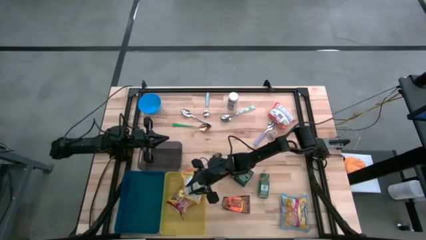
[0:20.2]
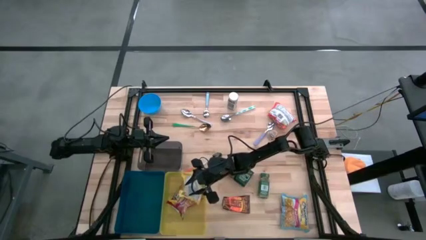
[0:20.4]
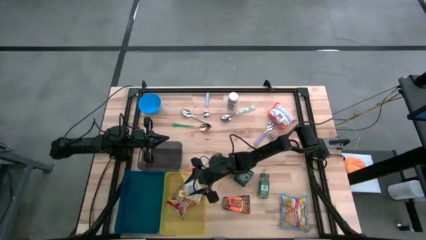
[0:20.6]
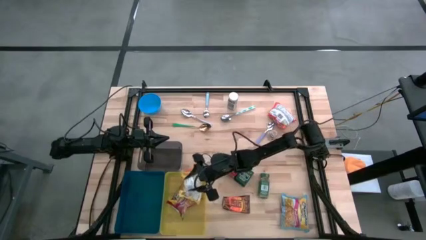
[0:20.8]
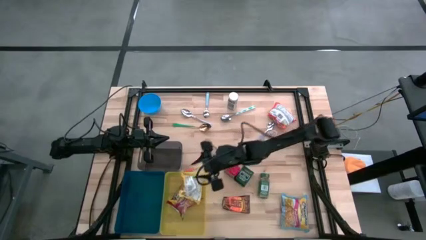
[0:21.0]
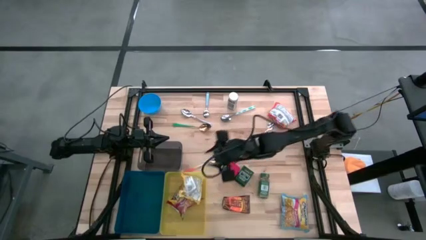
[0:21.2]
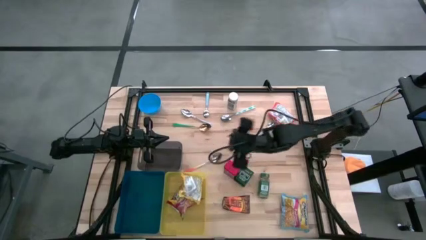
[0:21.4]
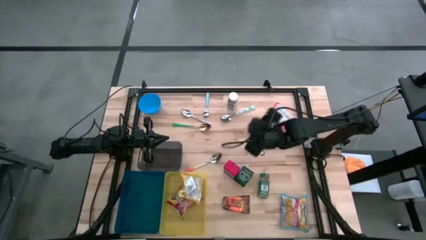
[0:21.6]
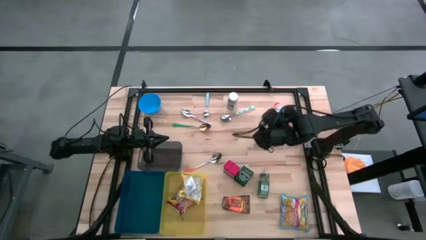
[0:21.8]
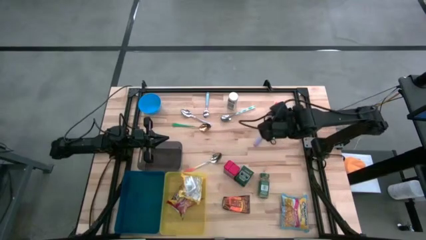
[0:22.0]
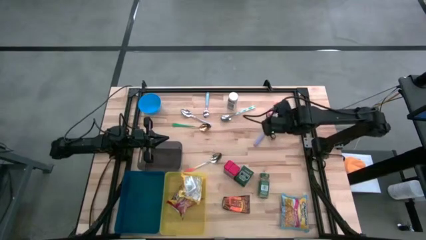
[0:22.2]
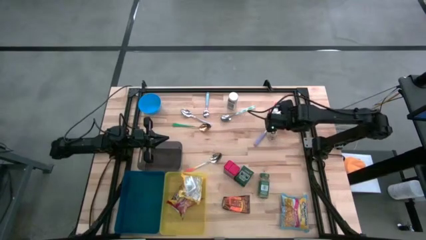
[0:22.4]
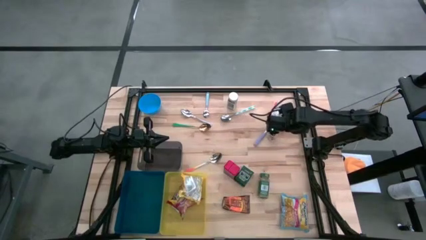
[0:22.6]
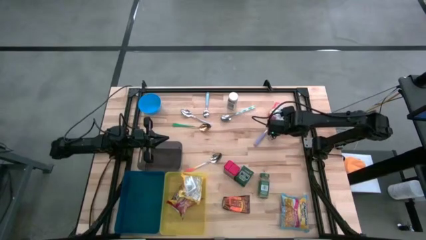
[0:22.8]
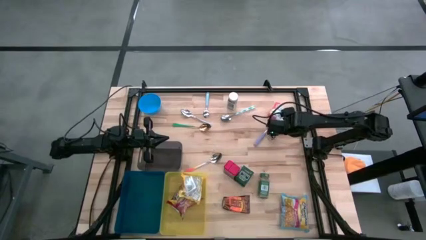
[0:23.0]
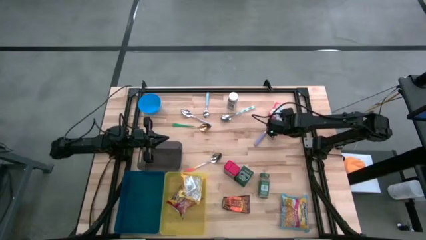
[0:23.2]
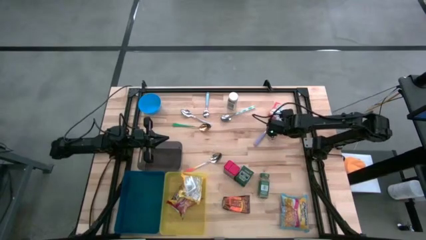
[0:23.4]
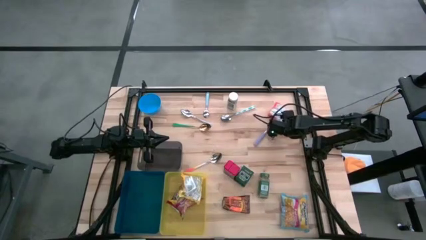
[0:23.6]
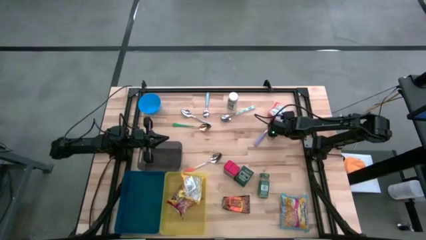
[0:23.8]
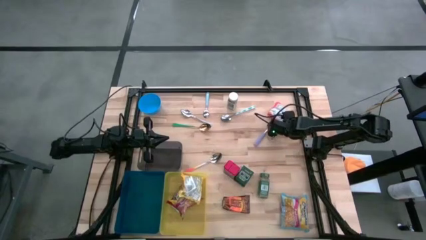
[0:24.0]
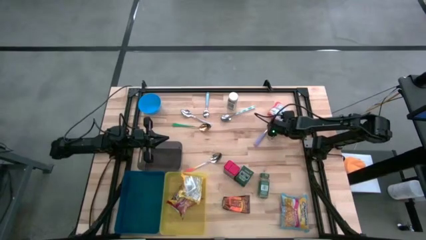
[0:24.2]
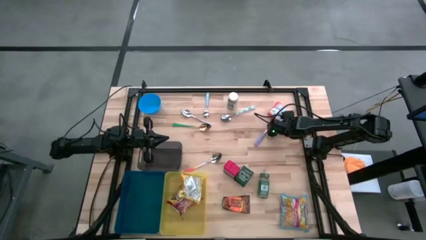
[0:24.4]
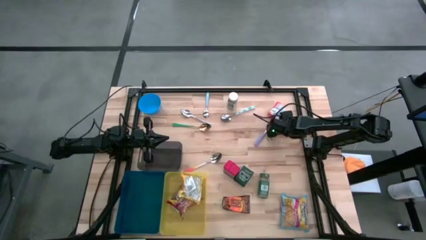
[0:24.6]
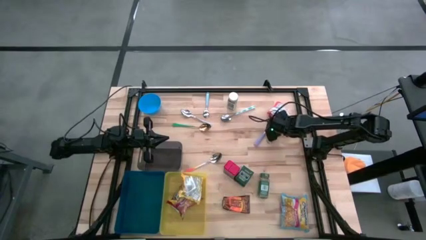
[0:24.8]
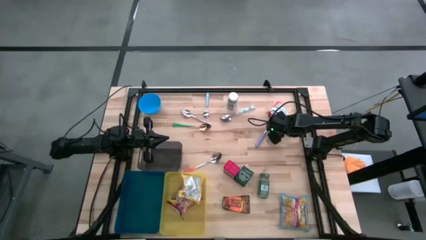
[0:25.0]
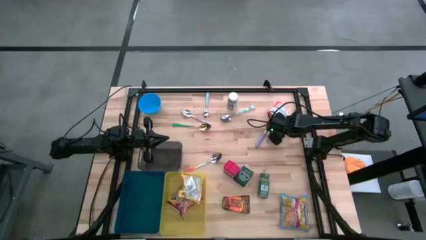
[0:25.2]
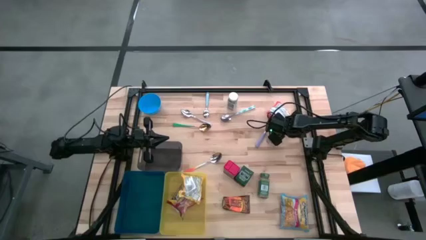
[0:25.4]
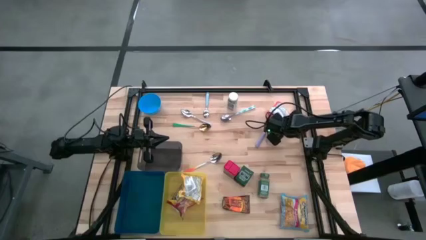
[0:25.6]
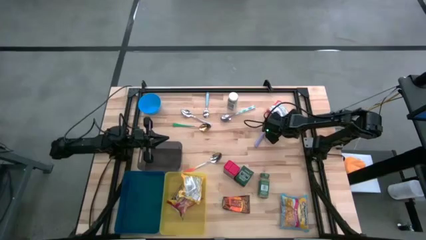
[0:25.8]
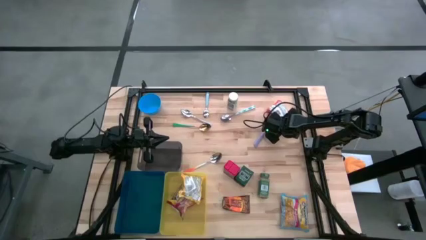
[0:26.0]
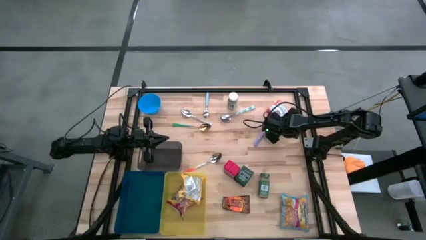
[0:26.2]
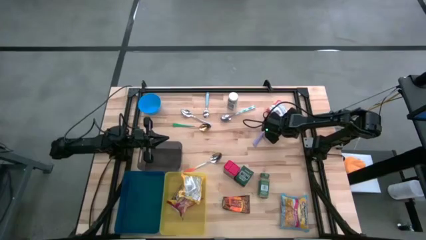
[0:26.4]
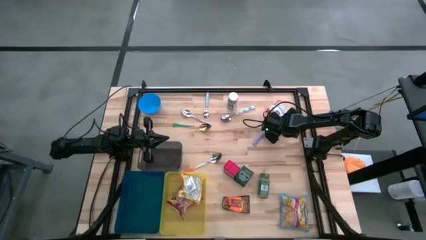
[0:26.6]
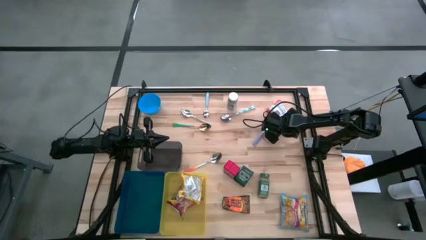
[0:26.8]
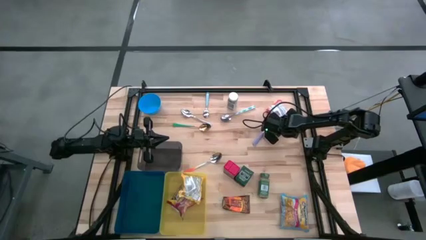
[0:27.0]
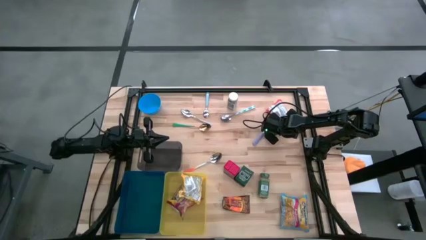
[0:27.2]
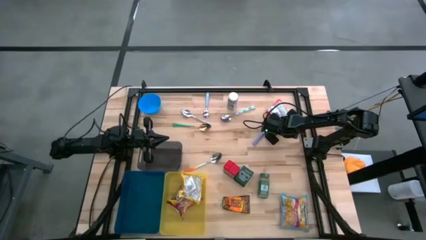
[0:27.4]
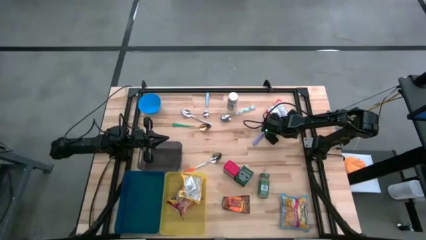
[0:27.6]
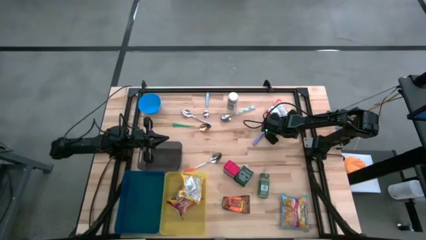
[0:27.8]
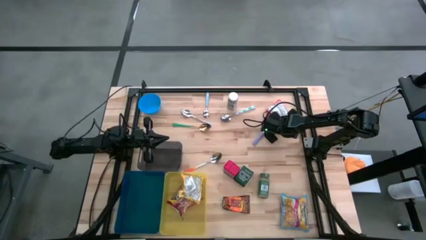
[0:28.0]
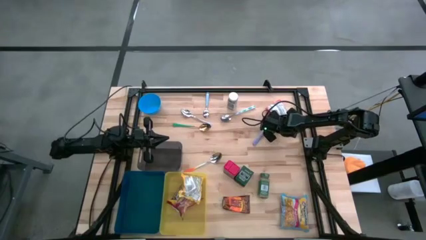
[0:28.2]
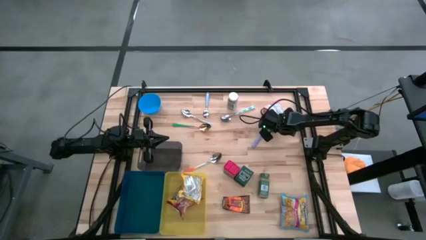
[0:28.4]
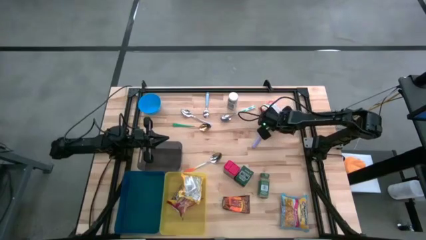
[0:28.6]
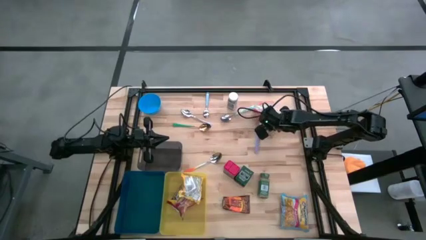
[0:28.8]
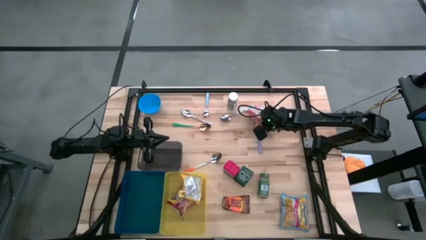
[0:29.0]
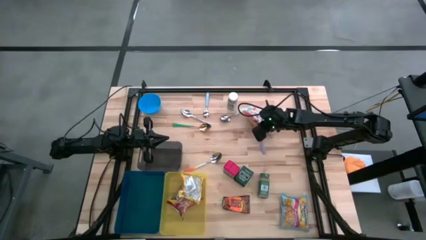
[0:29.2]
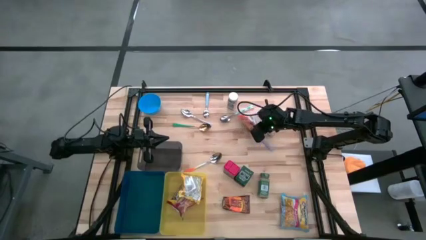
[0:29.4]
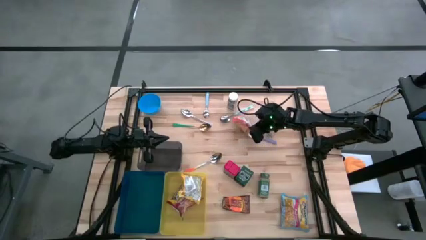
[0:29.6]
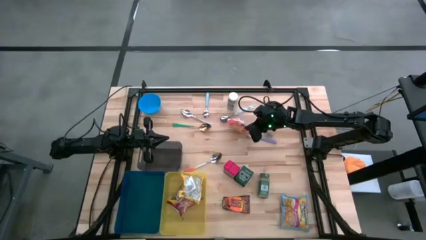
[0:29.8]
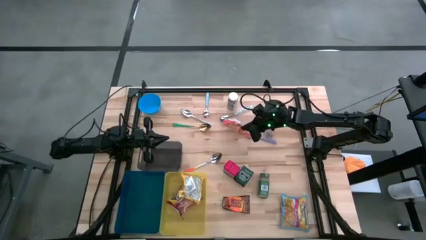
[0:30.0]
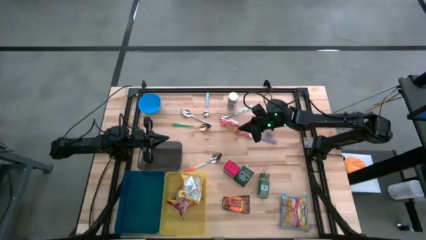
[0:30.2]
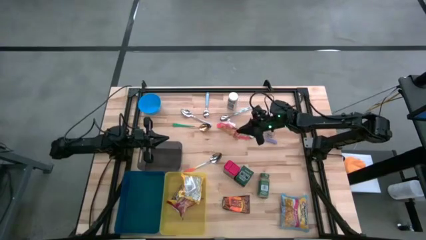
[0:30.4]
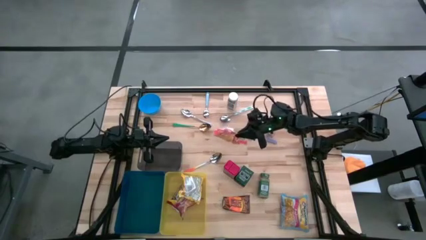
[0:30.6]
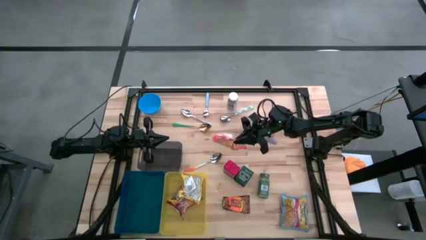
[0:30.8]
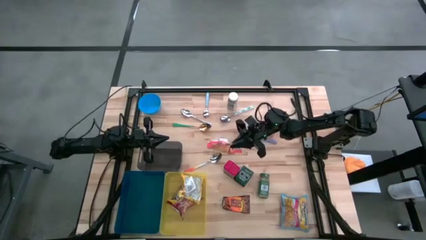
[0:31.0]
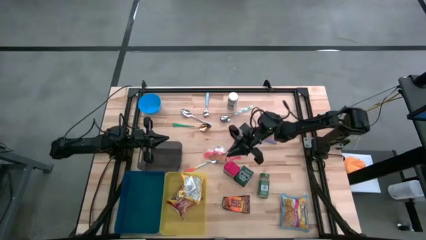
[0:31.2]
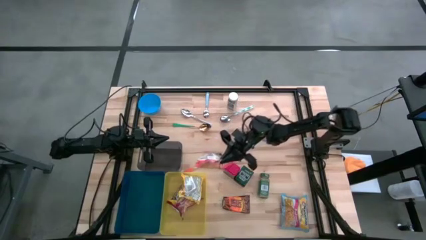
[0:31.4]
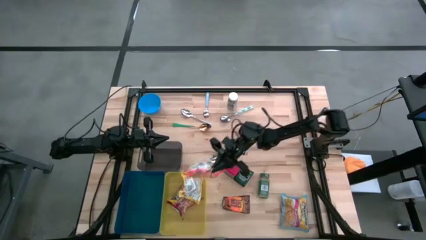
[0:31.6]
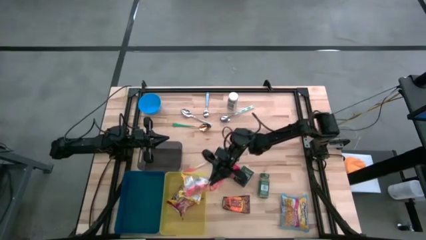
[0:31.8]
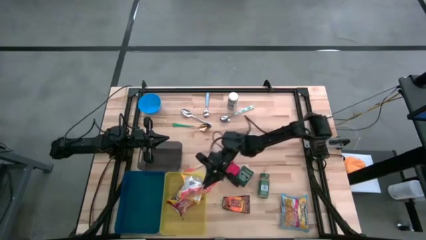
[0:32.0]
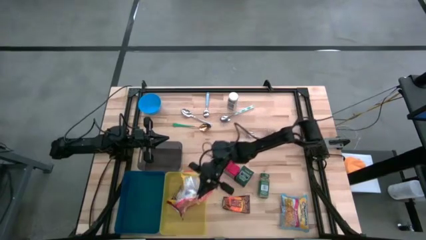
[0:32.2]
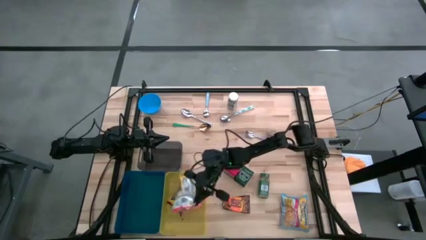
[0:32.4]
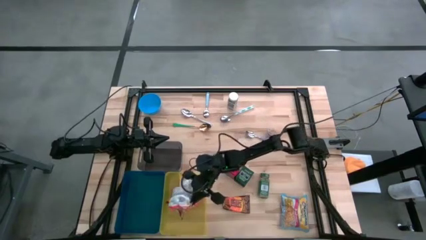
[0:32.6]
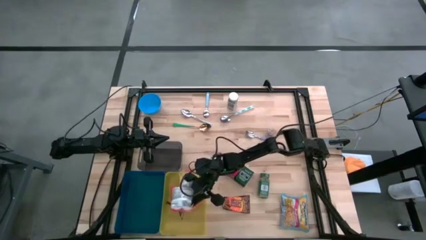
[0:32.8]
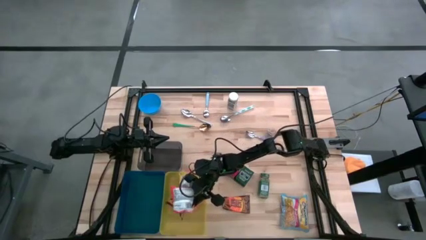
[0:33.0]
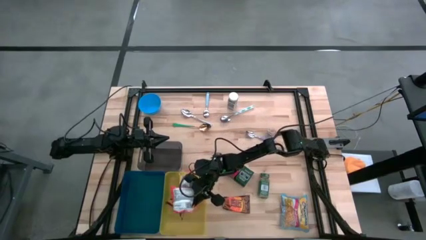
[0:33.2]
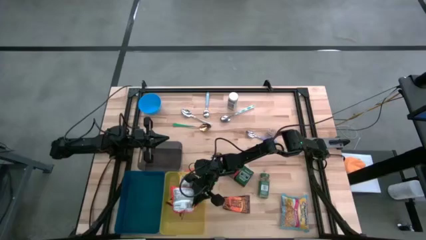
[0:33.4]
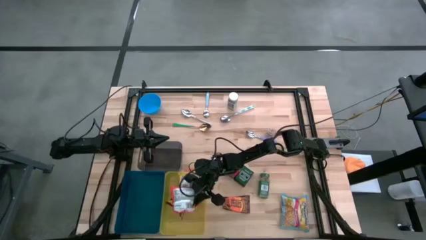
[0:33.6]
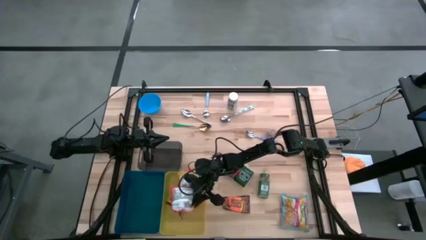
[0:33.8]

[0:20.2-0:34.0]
Put the orange noodle pack into the yellow bin
